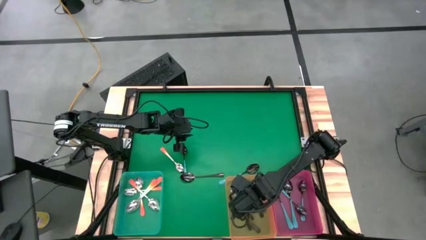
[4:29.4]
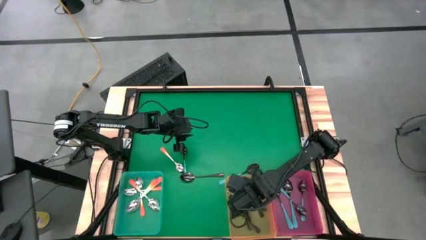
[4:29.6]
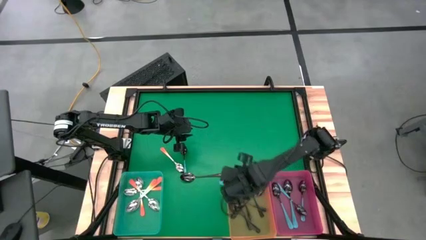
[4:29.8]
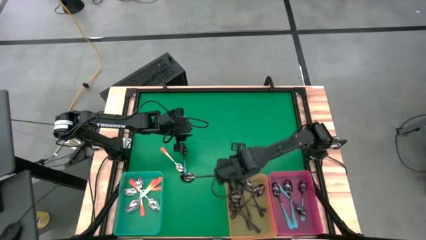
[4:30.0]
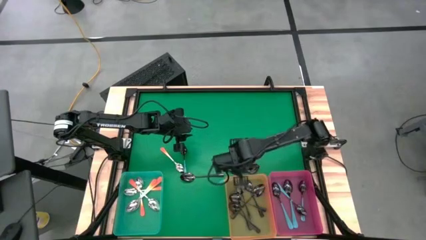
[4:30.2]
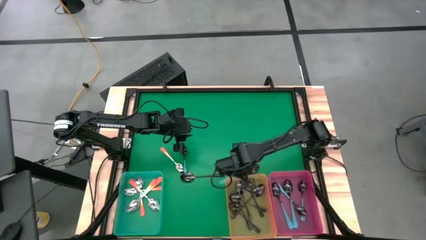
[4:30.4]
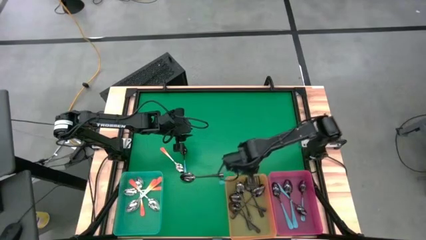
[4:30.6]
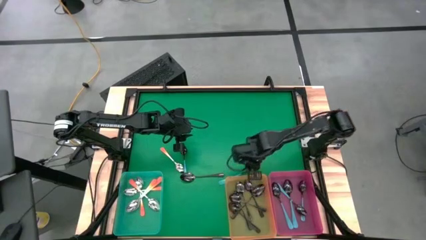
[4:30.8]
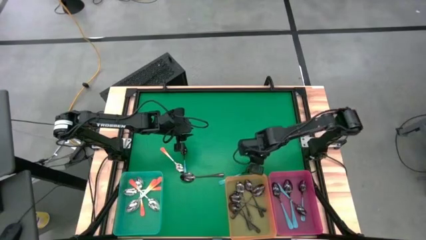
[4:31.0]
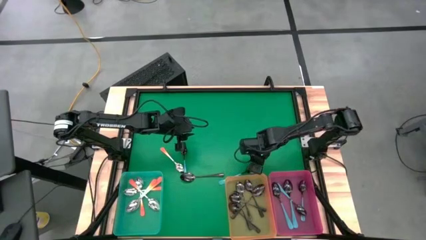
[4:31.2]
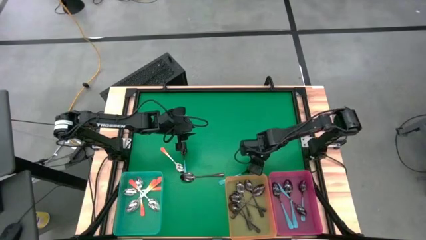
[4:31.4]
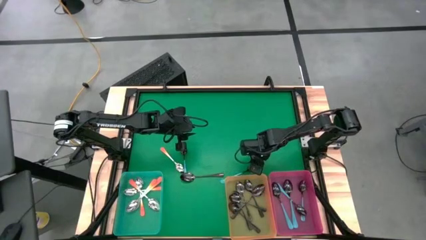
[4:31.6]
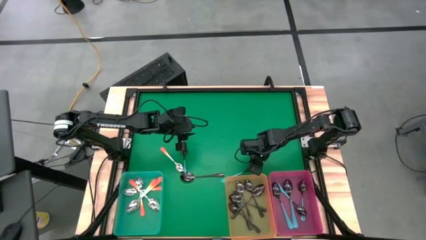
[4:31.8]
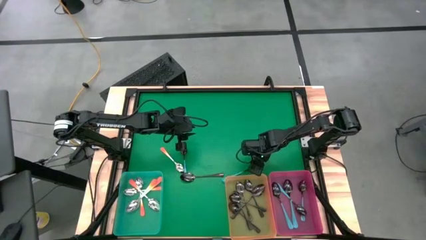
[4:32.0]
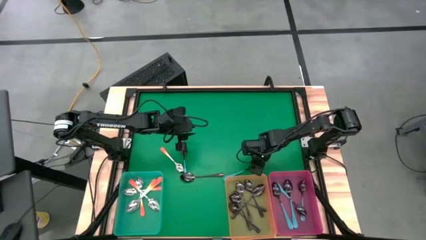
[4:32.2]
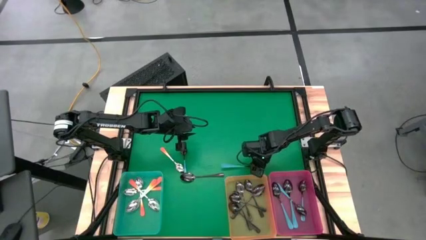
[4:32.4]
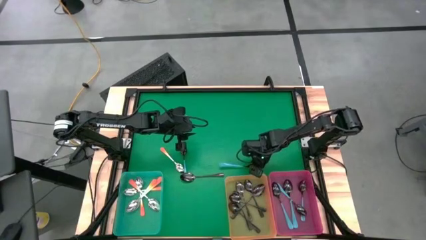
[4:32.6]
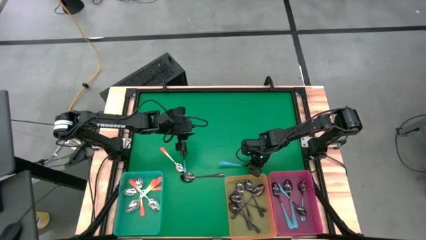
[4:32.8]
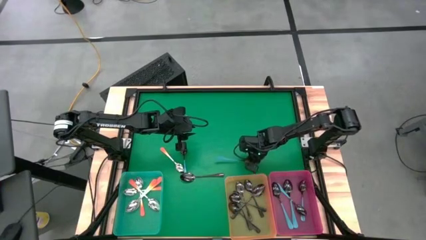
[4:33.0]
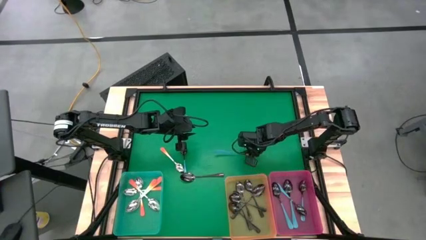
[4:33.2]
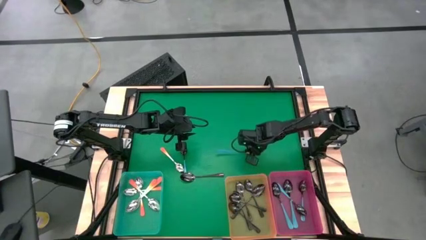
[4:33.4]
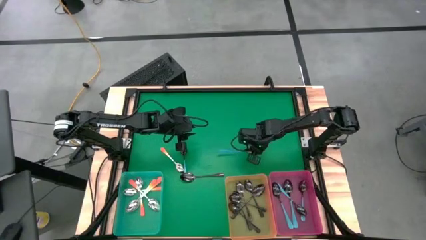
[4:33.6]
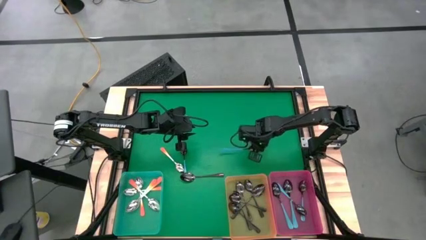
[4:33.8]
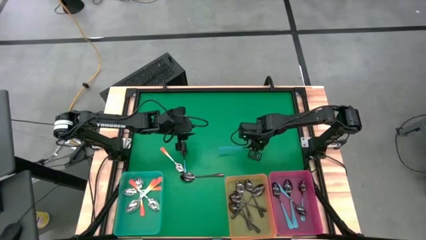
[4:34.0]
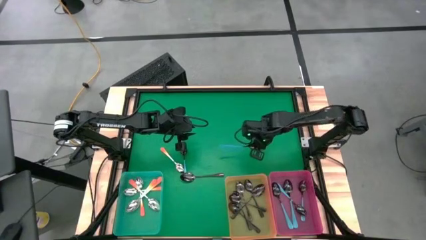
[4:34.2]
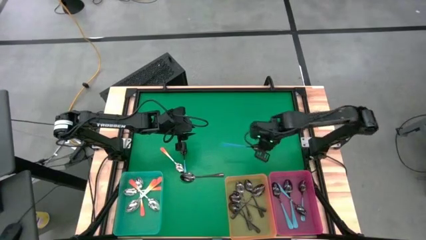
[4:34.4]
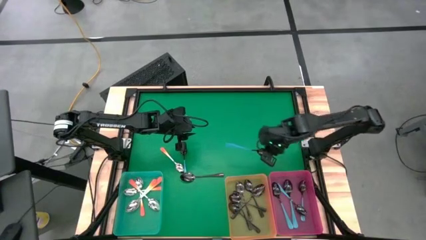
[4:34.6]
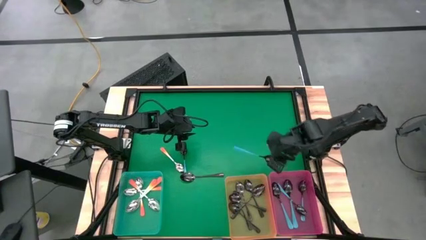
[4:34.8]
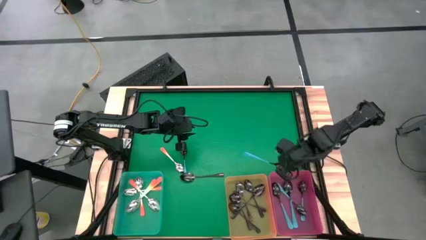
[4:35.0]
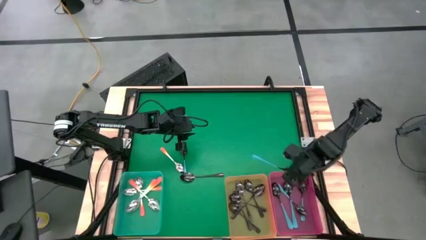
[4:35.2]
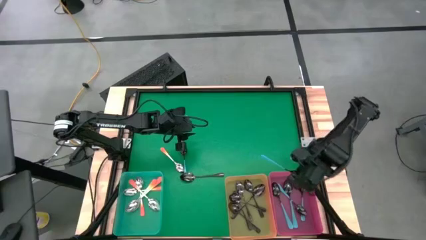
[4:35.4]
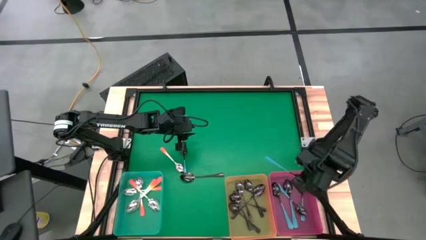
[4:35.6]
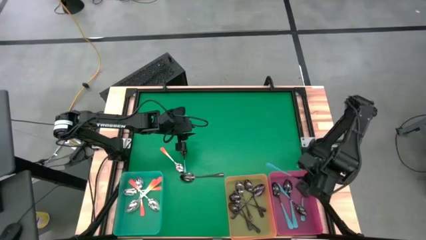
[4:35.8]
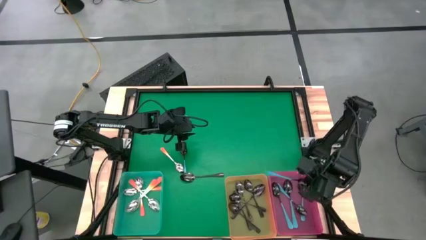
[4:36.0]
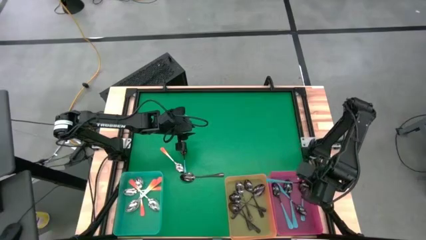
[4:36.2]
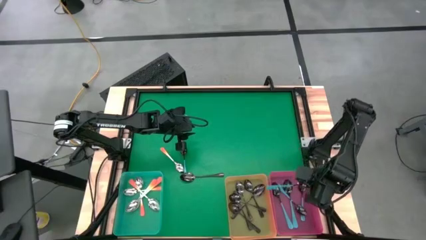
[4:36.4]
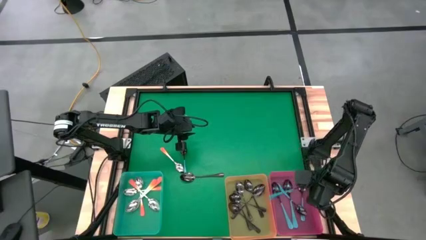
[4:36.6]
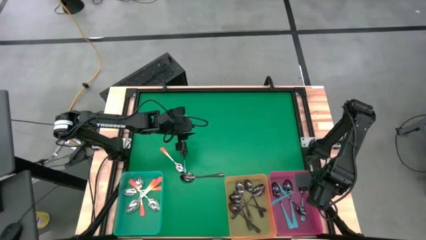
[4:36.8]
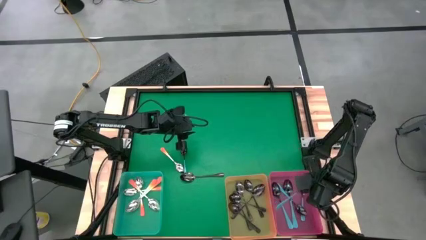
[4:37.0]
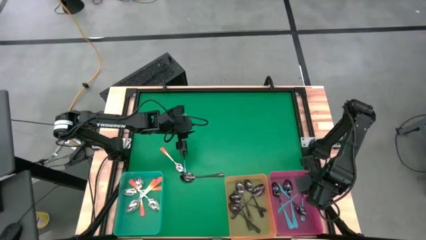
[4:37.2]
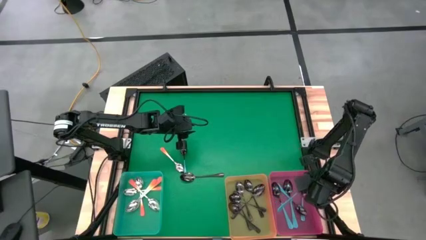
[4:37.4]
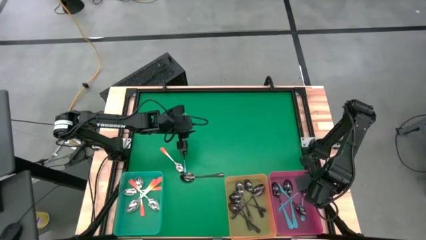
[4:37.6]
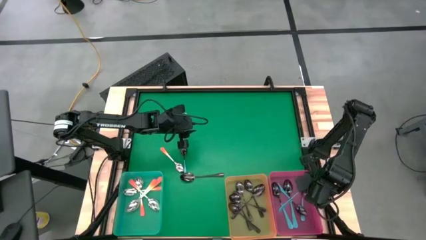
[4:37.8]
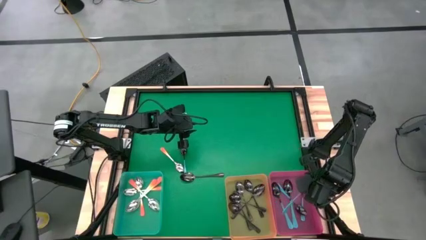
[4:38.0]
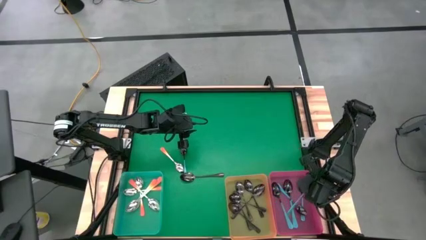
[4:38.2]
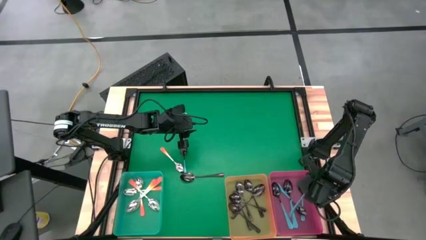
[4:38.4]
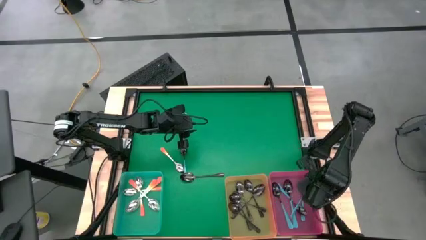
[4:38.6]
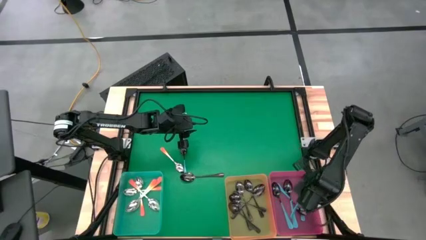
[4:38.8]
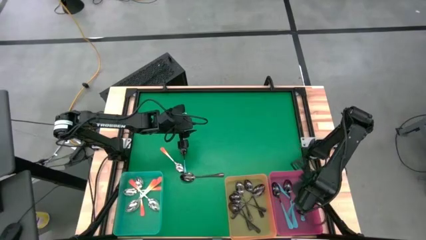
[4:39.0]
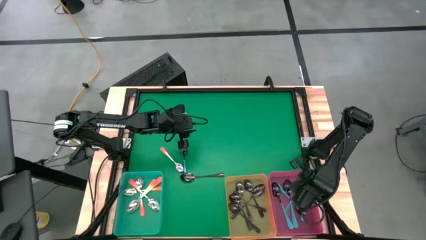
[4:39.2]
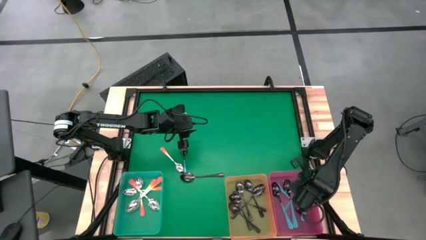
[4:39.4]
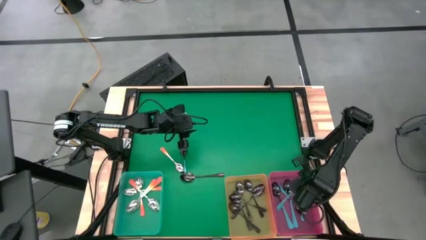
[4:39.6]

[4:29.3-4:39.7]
Task: Sort silverware by color (type)
Put the blue spoon into the pink bin
